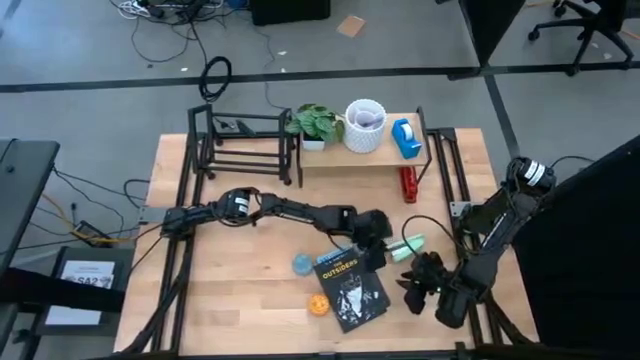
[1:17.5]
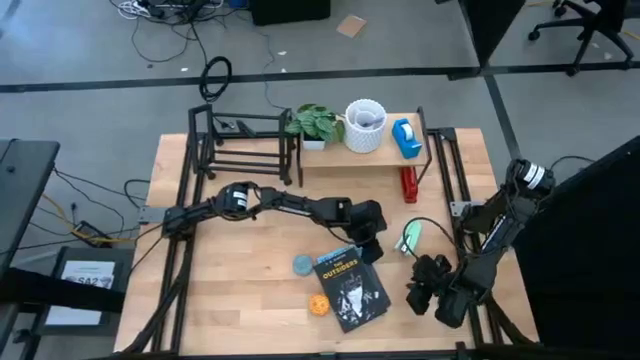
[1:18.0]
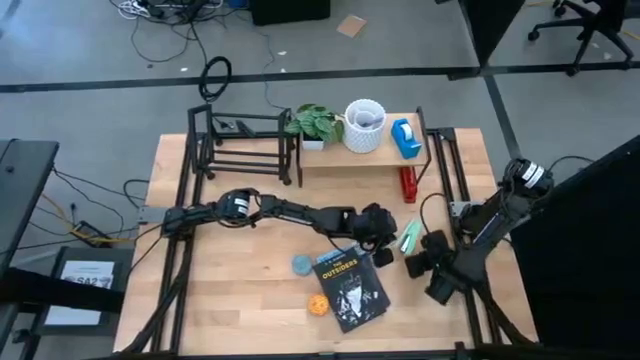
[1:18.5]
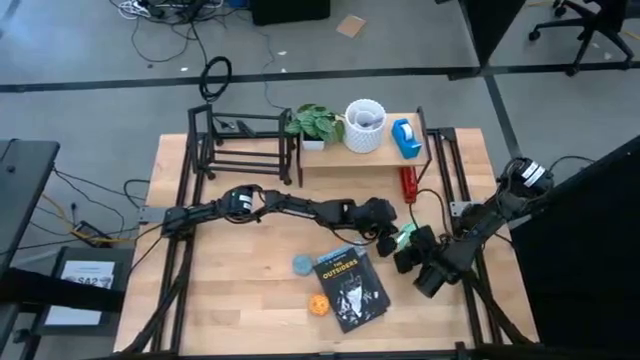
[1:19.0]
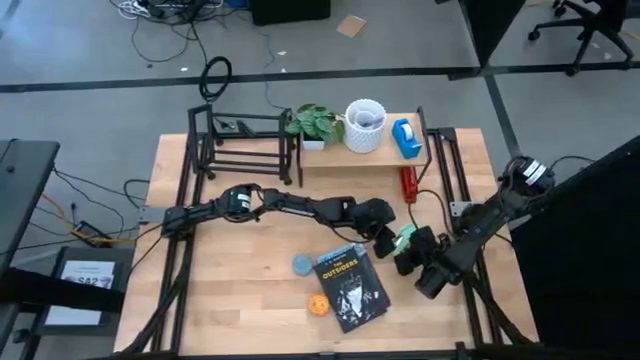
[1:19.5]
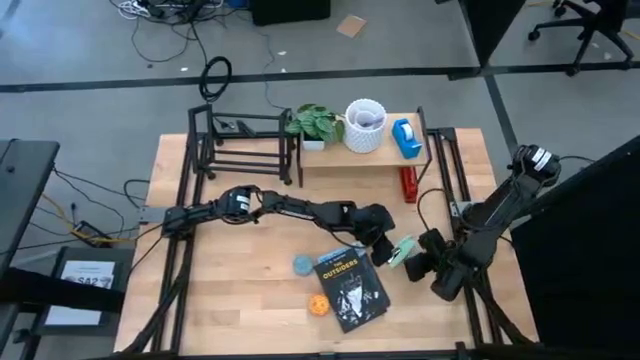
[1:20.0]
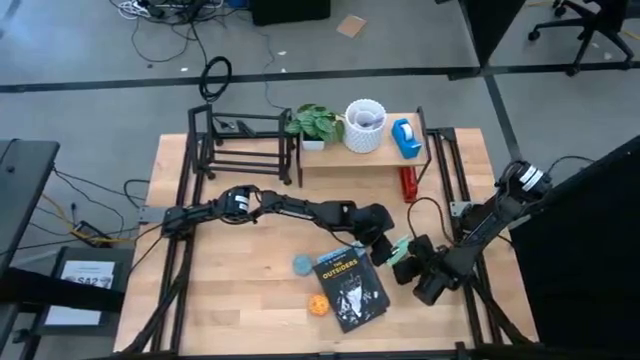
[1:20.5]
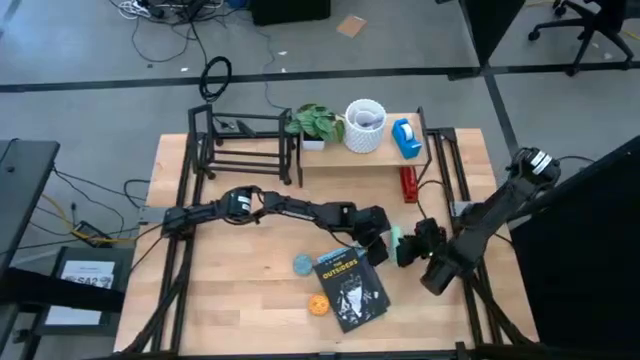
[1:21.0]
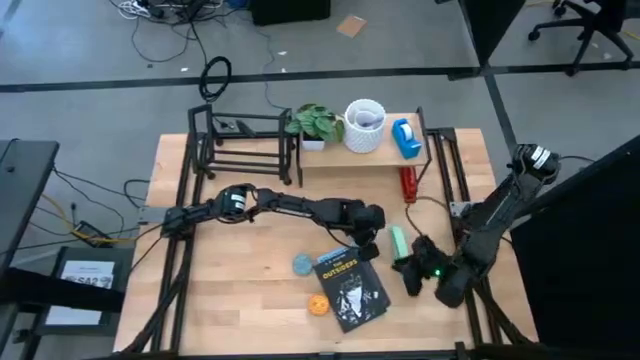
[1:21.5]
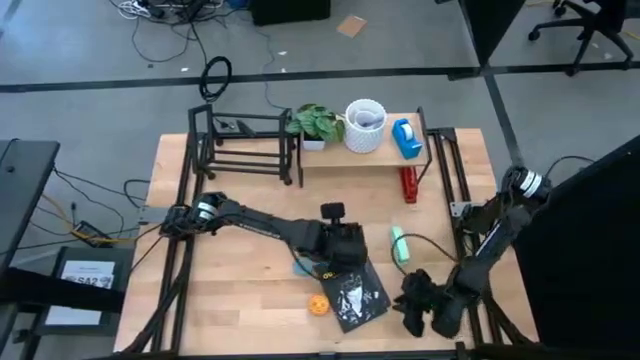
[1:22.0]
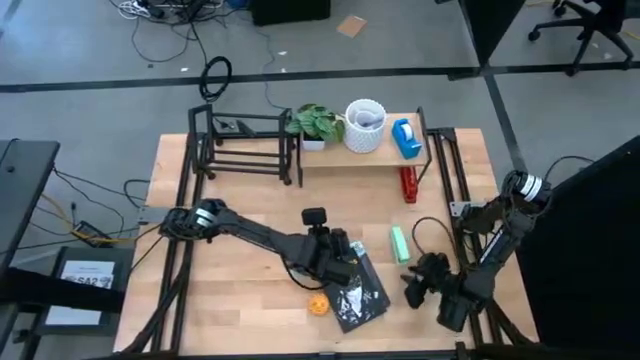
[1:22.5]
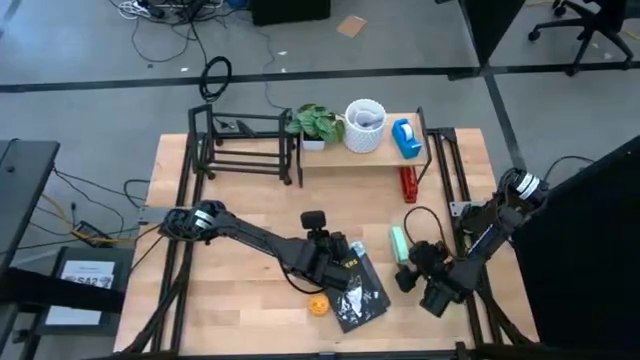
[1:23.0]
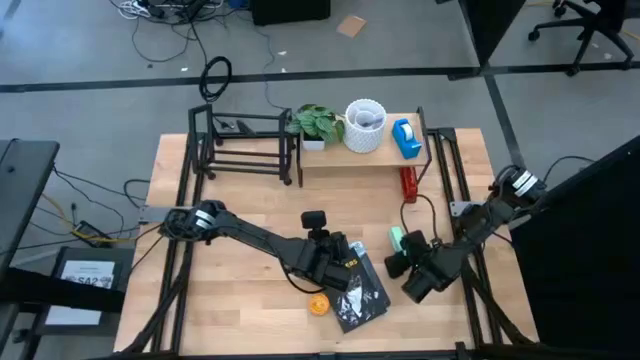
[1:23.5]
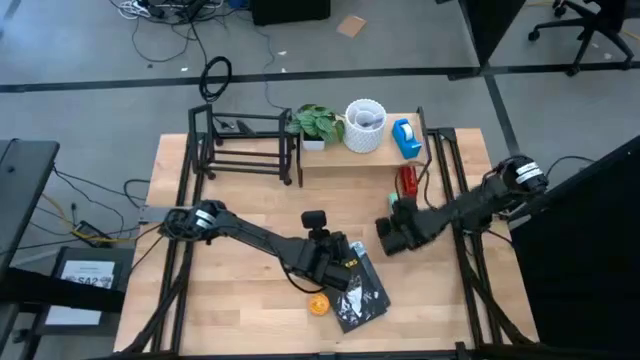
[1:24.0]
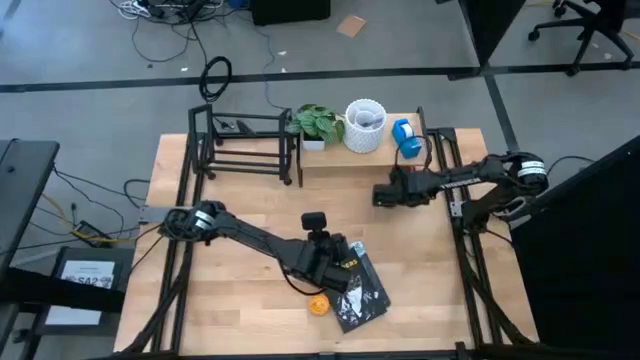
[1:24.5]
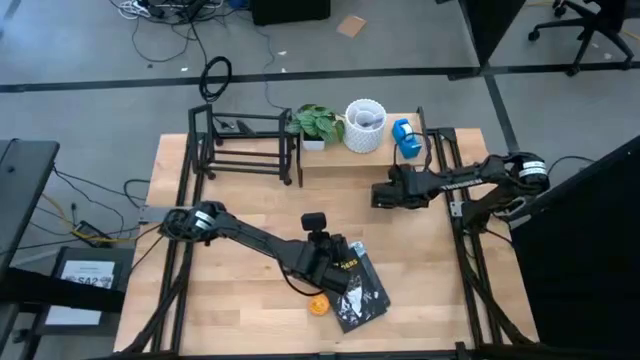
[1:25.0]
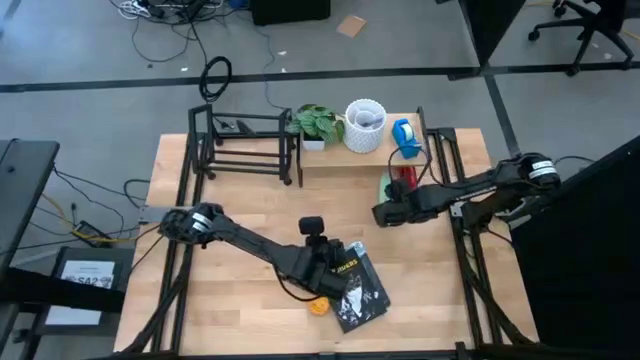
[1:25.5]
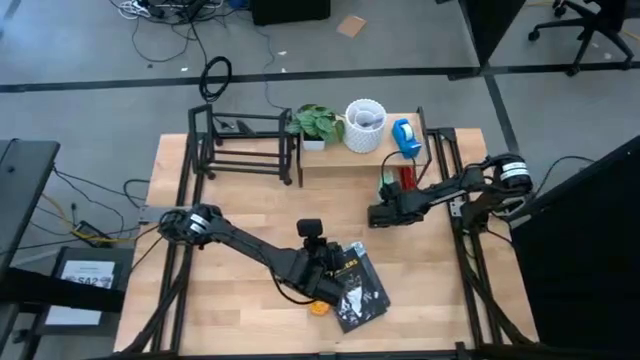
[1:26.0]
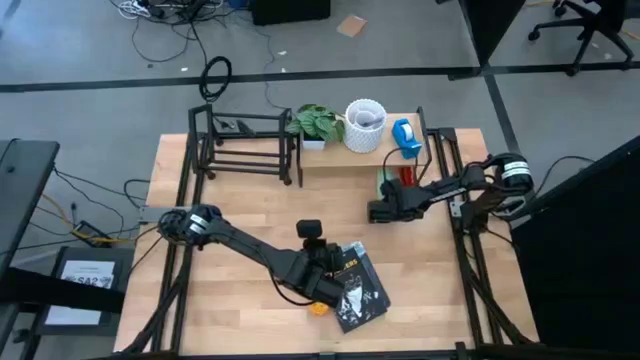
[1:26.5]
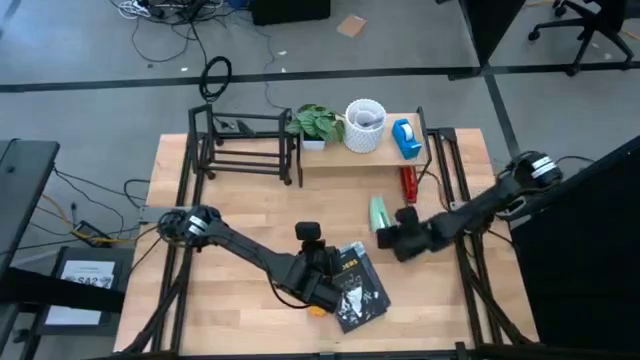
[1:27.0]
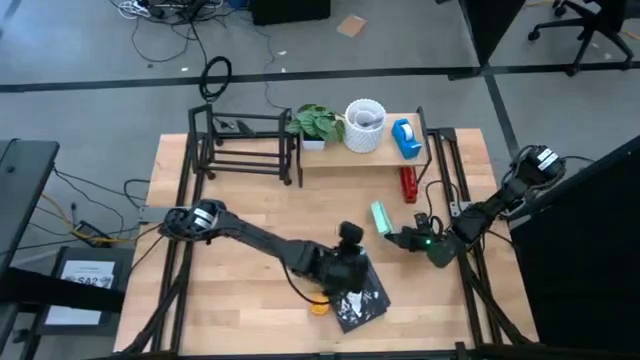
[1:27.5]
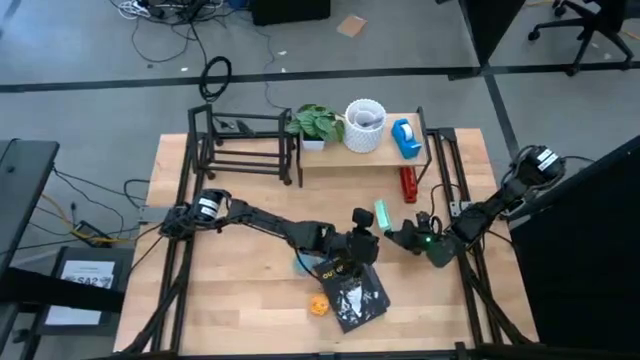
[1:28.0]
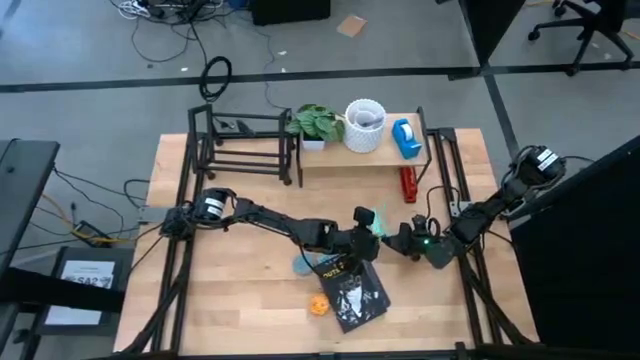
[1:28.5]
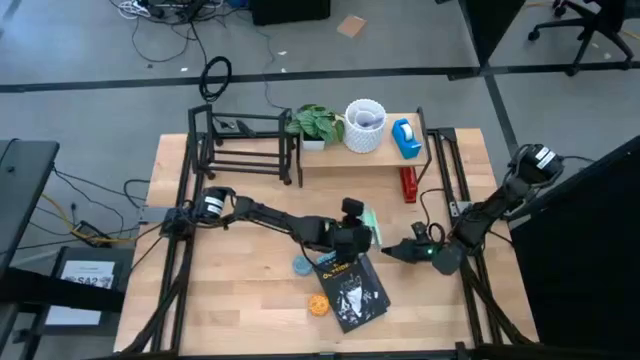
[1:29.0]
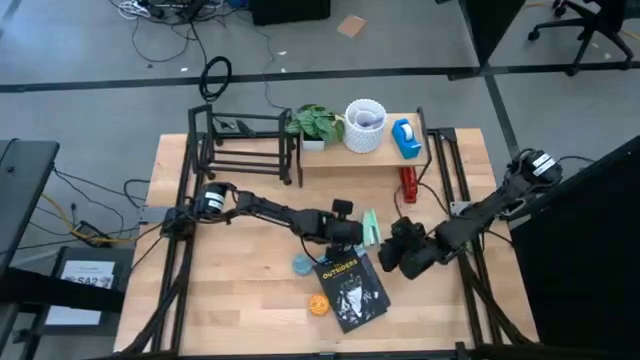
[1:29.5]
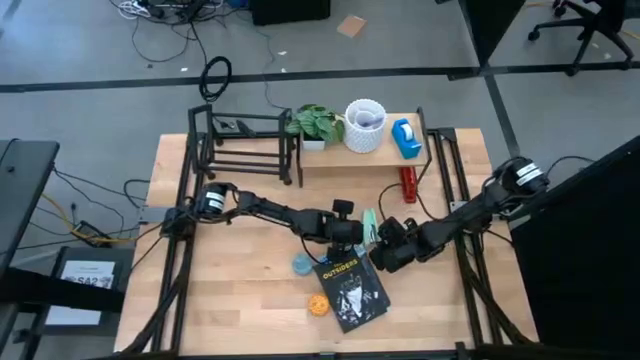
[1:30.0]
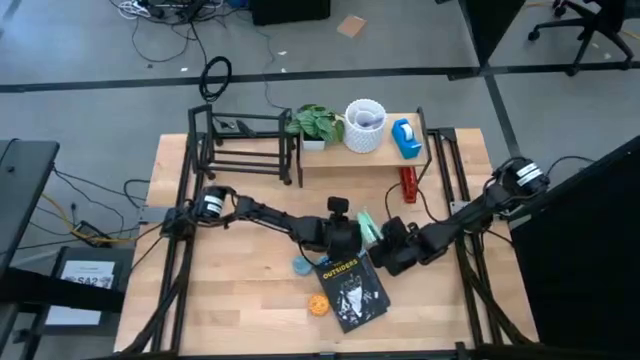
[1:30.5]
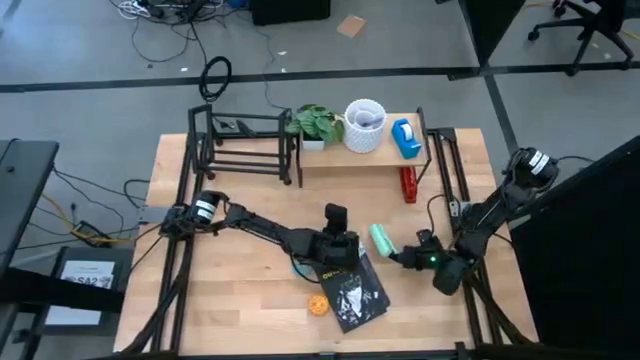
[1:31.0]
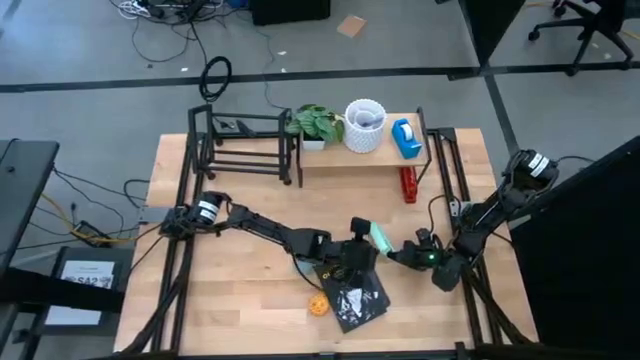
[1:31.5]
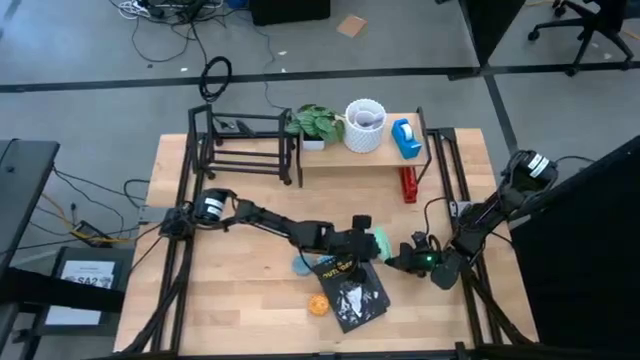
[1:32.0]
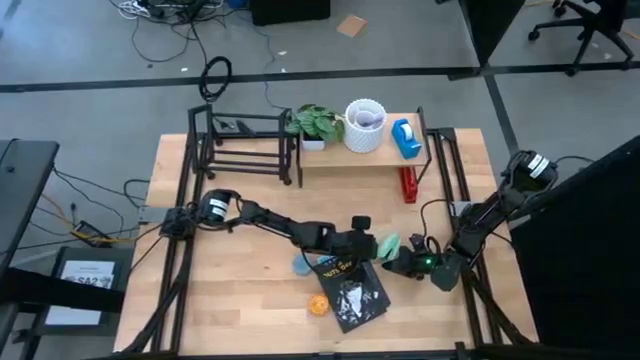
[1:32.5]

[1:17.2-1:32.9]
Task: Stock shelves
Put the green stapler under the shelf

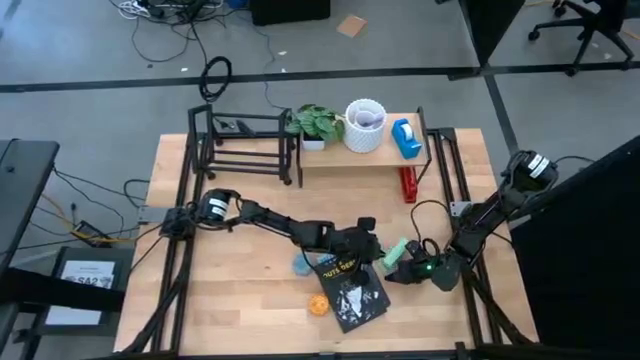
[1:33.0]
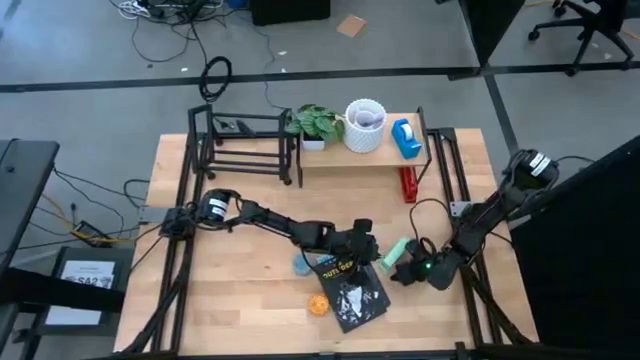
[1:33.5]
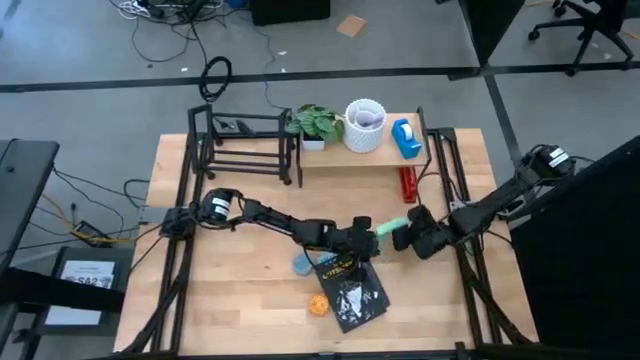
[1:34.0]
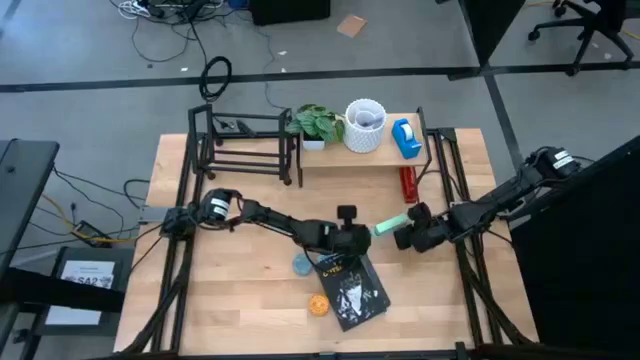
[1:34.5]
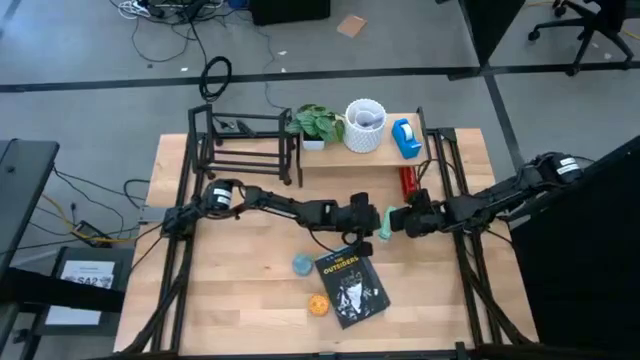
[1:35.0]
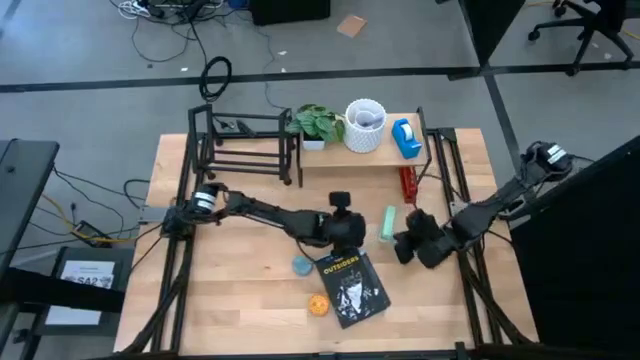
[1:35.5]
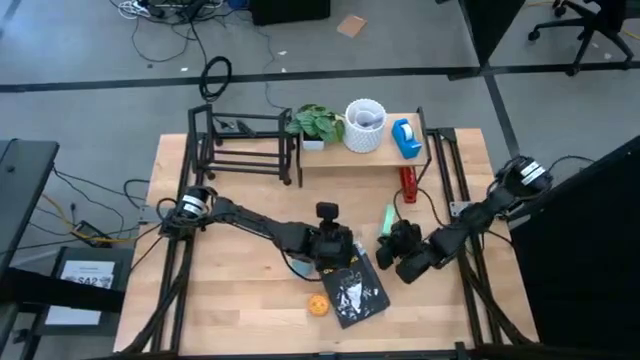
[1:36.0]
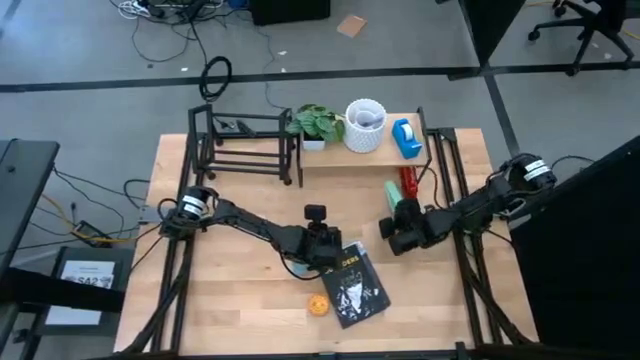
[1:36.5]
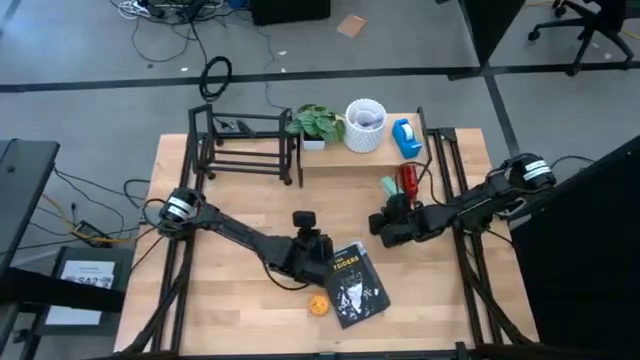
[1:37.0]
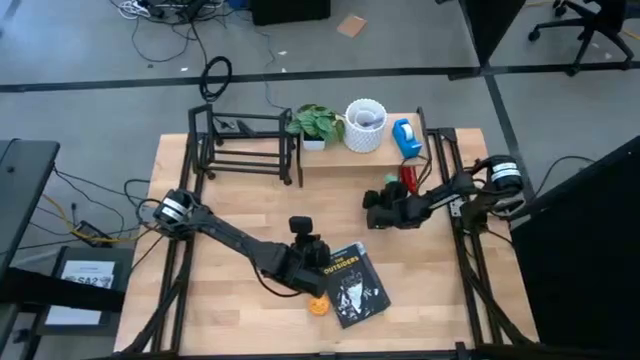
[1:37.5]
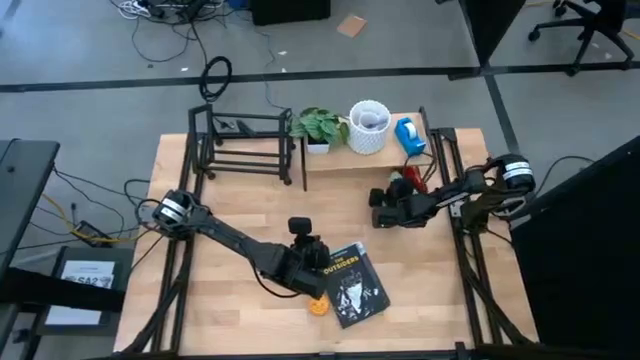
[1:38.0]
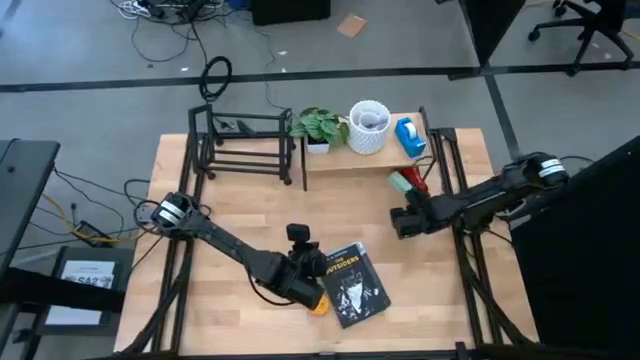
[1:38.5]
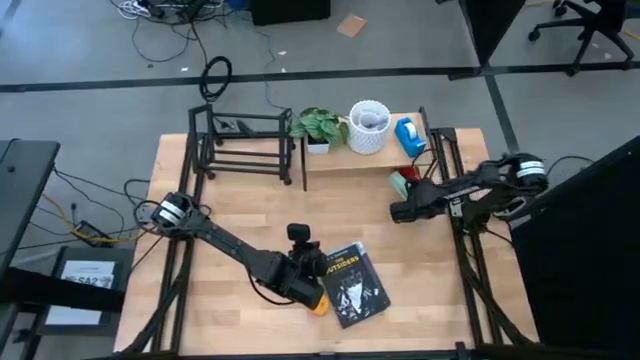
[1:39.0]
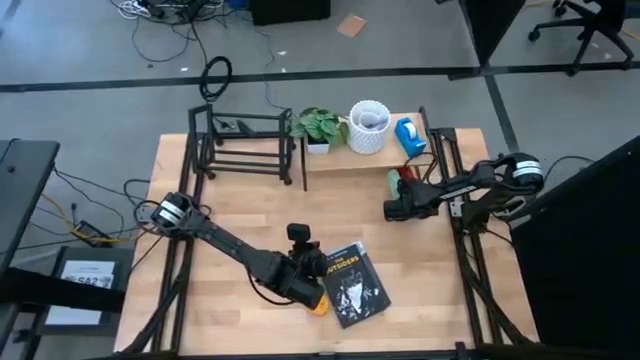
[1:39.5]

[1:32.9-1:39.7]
Put the green stapler under the shelf
